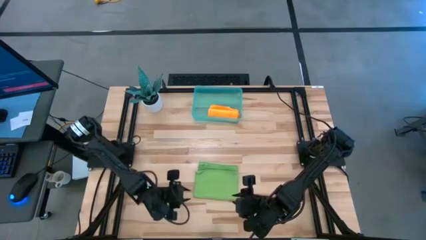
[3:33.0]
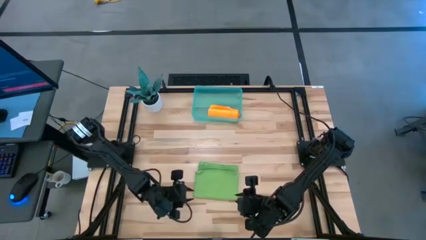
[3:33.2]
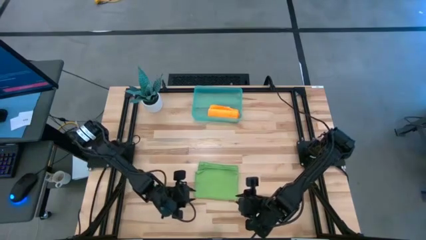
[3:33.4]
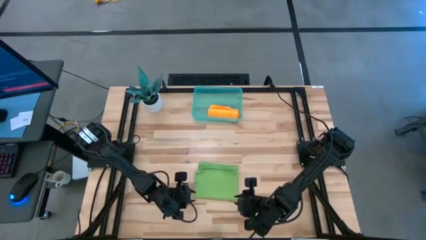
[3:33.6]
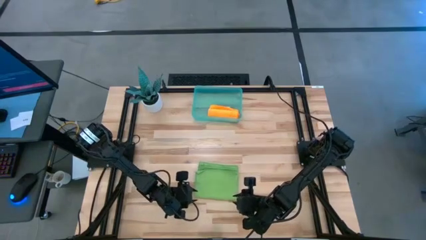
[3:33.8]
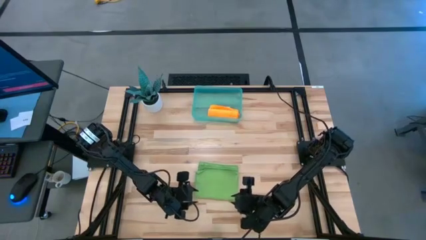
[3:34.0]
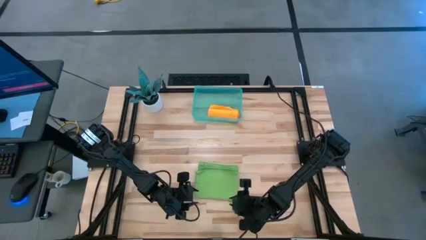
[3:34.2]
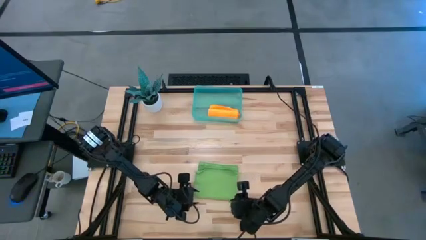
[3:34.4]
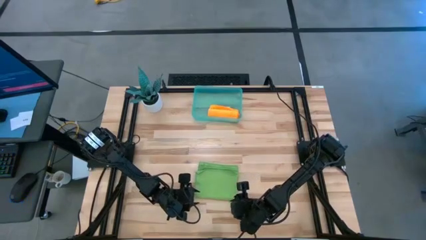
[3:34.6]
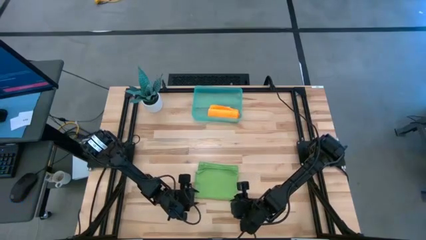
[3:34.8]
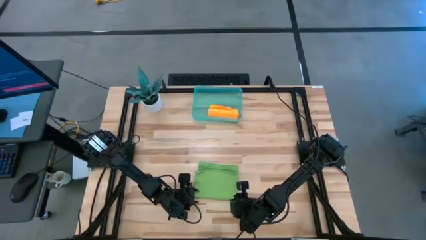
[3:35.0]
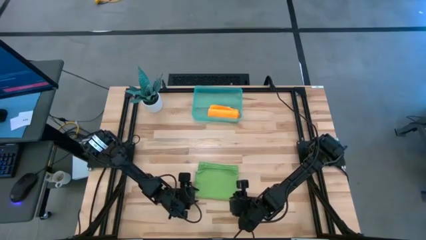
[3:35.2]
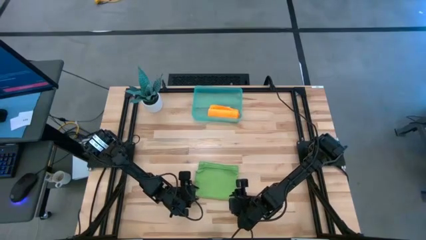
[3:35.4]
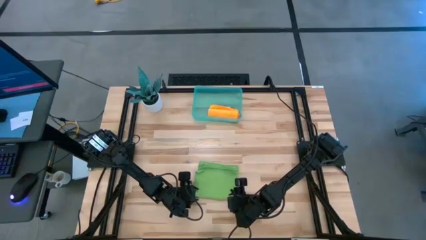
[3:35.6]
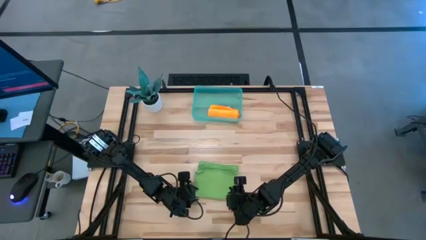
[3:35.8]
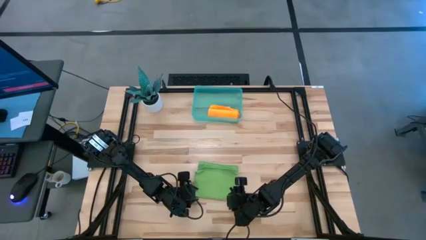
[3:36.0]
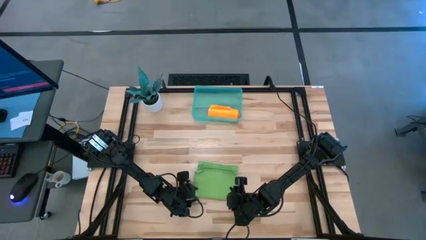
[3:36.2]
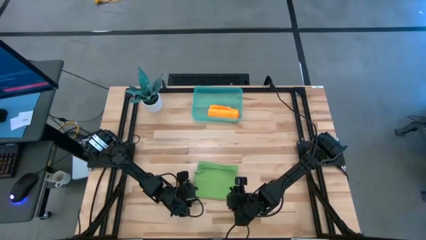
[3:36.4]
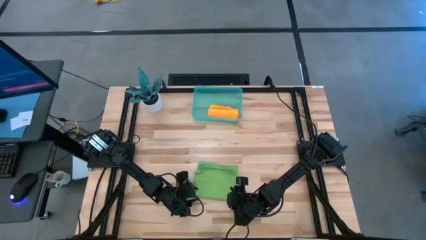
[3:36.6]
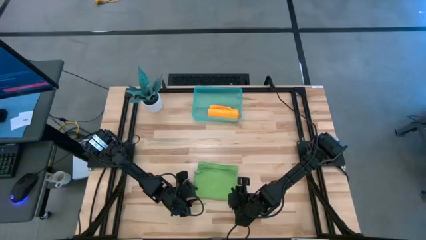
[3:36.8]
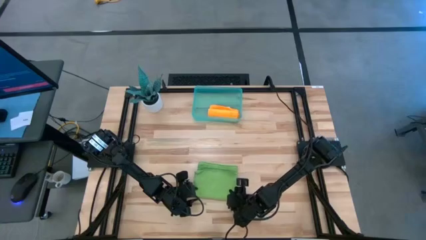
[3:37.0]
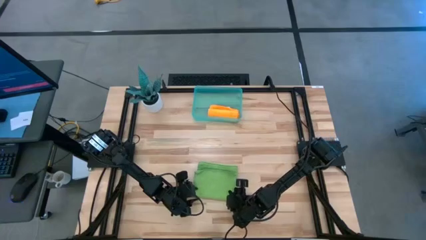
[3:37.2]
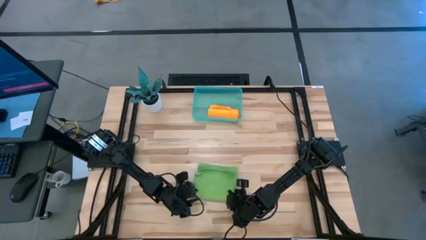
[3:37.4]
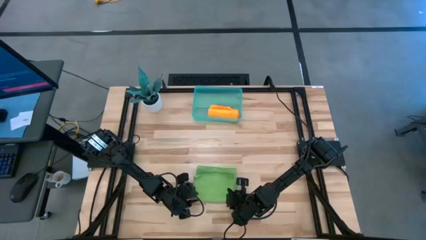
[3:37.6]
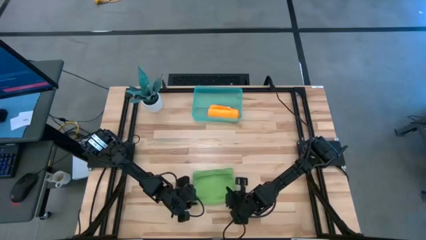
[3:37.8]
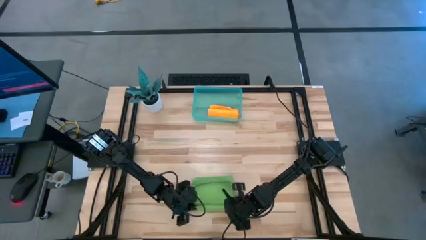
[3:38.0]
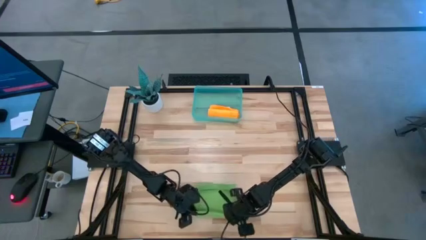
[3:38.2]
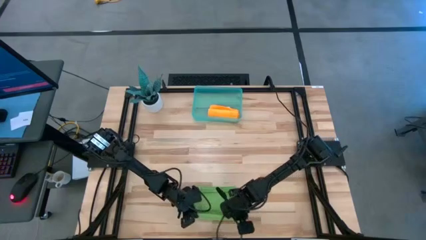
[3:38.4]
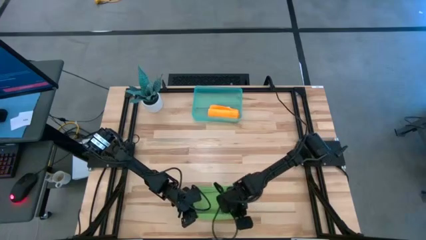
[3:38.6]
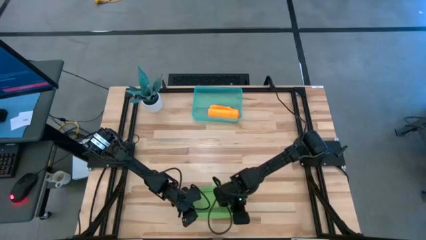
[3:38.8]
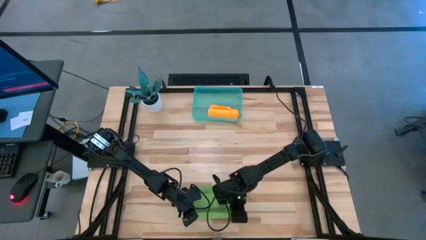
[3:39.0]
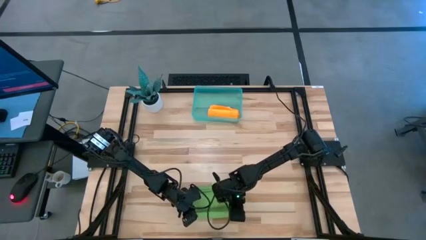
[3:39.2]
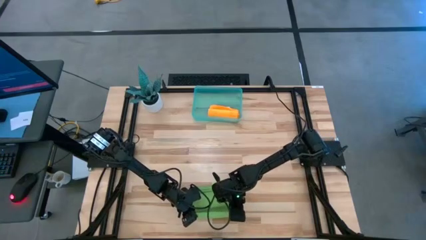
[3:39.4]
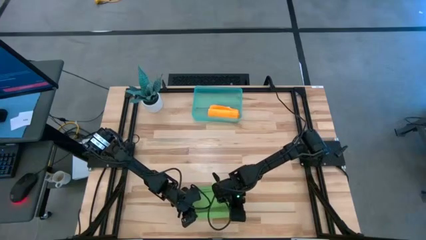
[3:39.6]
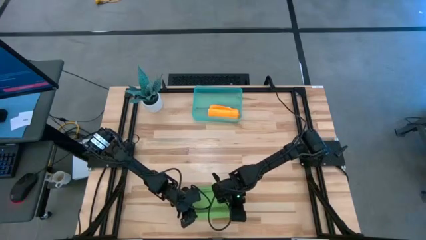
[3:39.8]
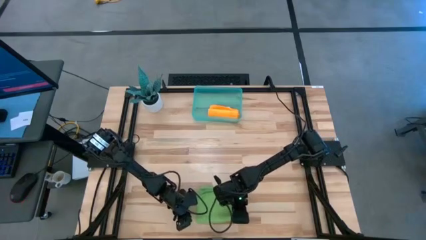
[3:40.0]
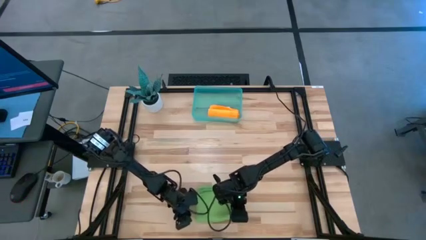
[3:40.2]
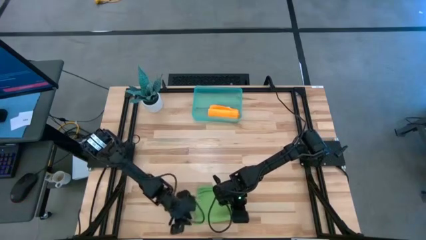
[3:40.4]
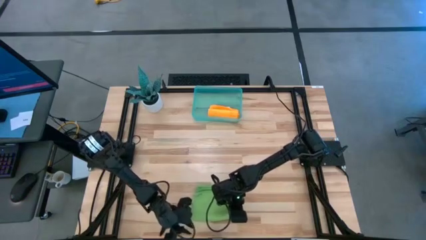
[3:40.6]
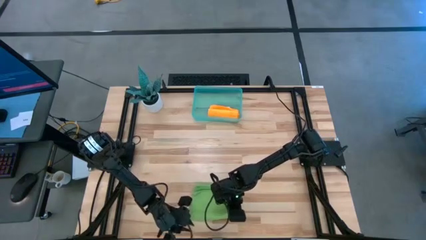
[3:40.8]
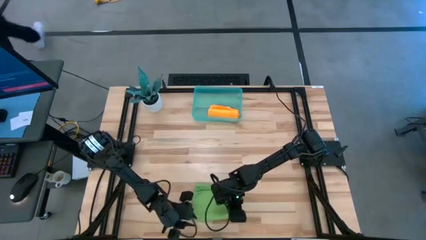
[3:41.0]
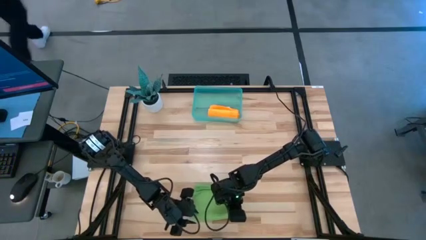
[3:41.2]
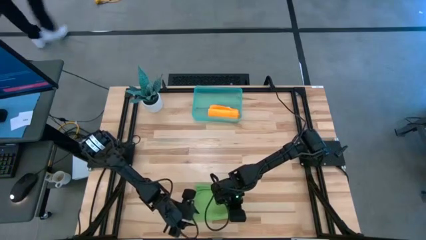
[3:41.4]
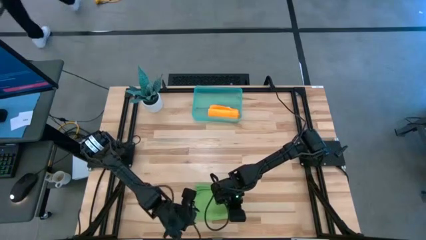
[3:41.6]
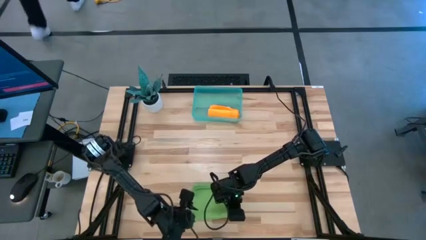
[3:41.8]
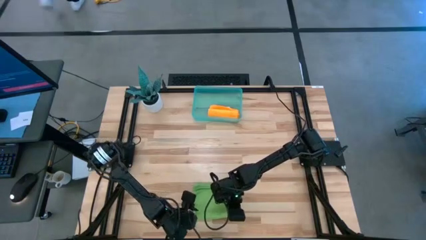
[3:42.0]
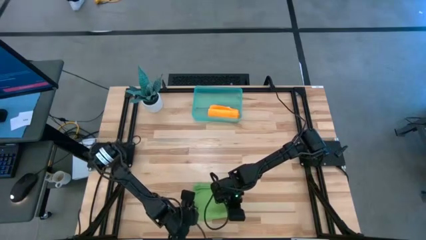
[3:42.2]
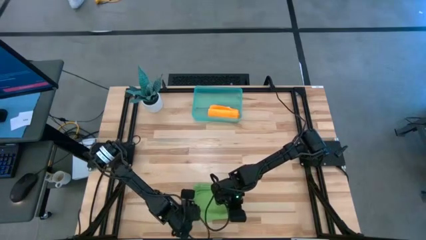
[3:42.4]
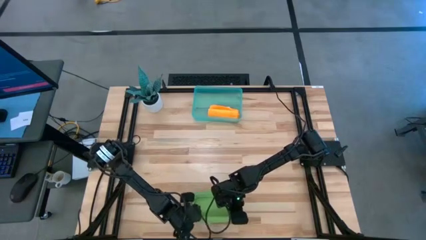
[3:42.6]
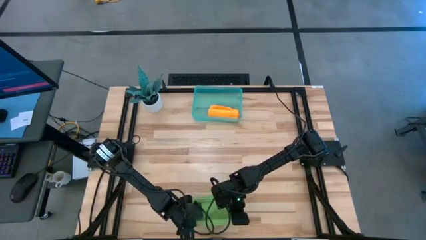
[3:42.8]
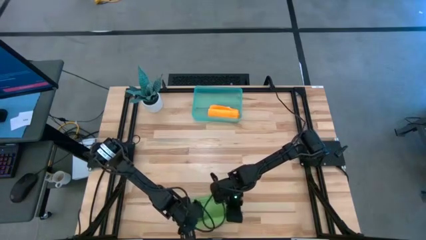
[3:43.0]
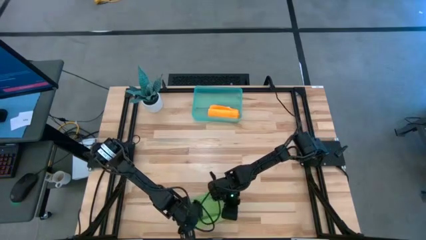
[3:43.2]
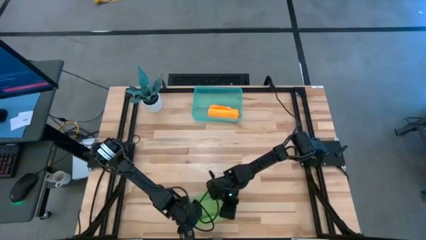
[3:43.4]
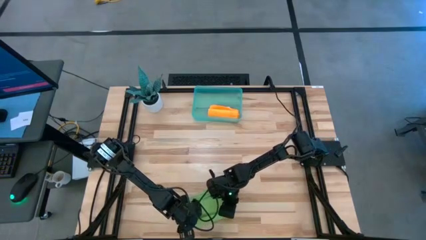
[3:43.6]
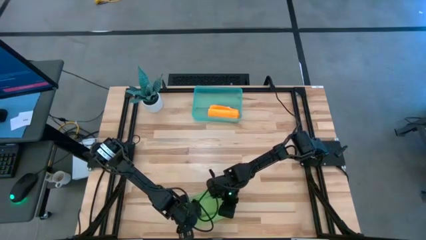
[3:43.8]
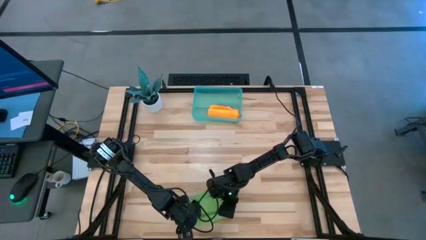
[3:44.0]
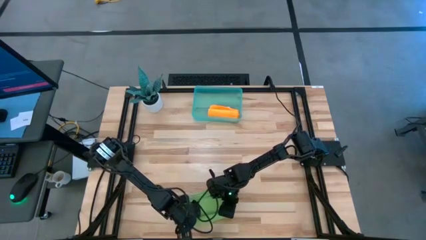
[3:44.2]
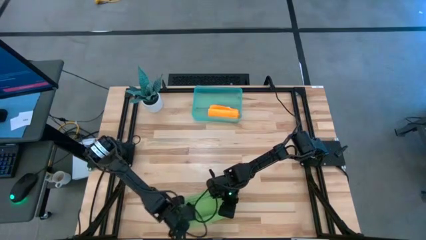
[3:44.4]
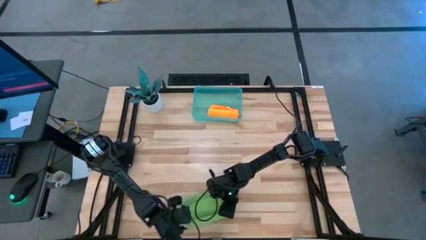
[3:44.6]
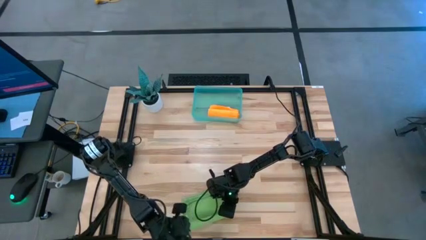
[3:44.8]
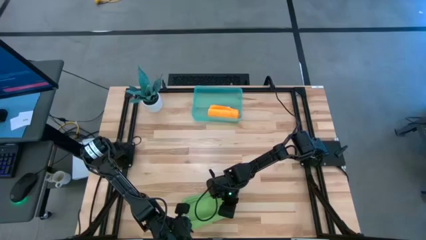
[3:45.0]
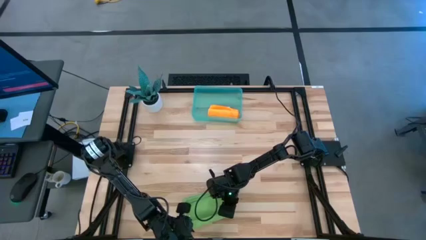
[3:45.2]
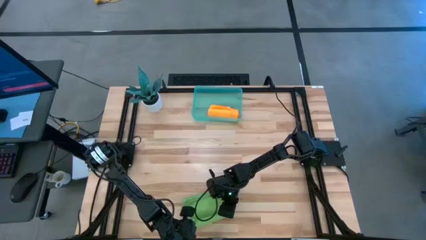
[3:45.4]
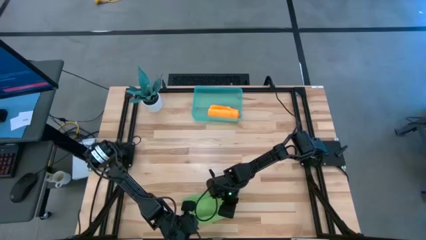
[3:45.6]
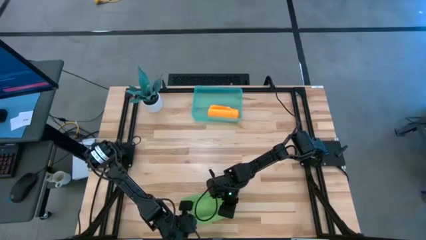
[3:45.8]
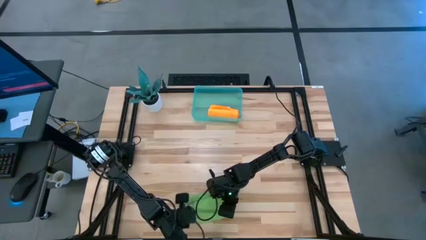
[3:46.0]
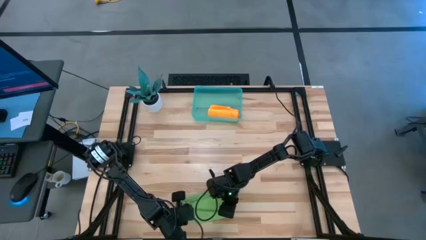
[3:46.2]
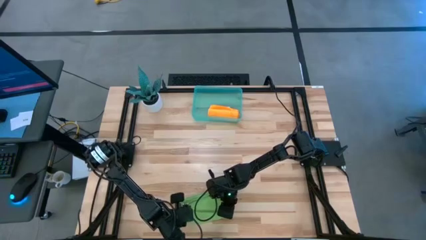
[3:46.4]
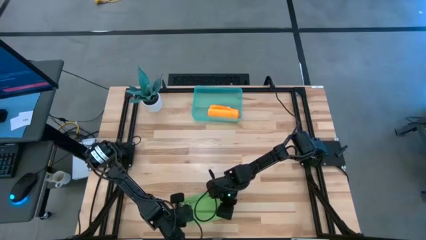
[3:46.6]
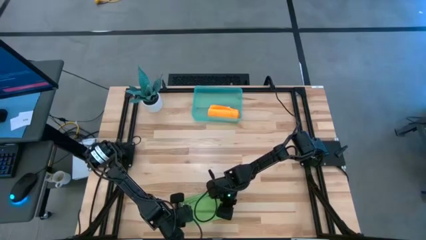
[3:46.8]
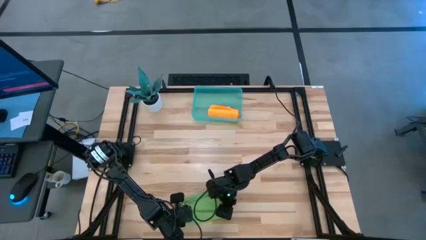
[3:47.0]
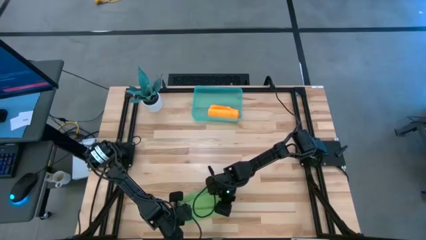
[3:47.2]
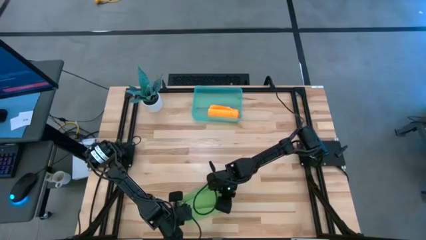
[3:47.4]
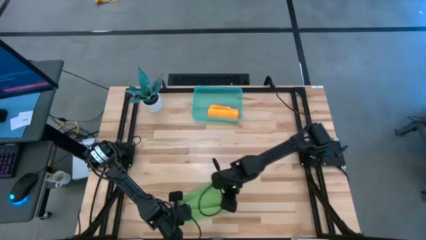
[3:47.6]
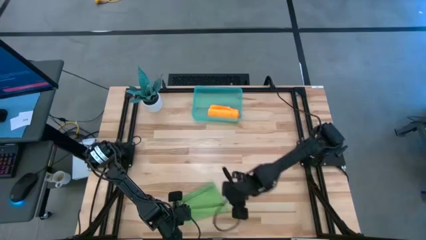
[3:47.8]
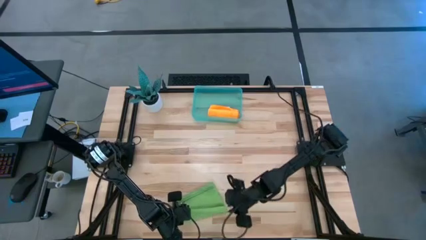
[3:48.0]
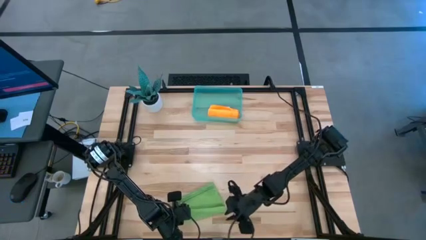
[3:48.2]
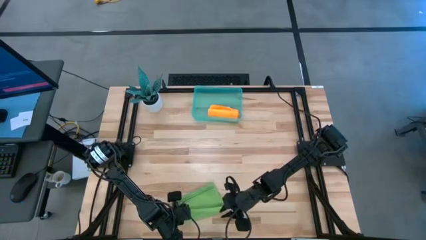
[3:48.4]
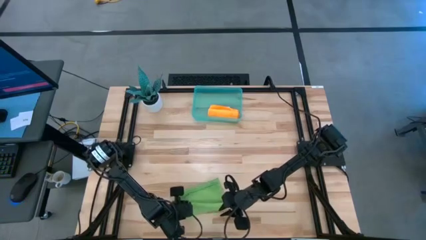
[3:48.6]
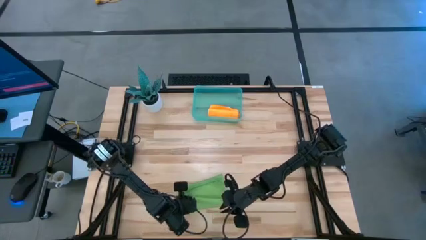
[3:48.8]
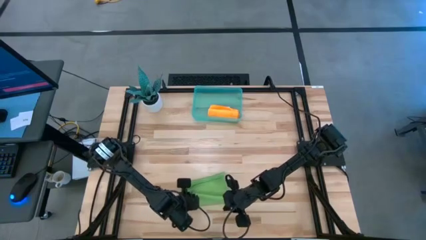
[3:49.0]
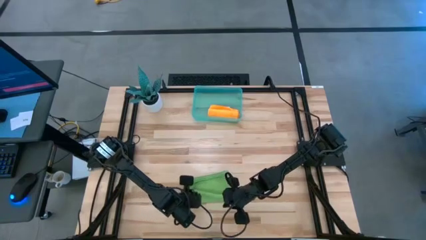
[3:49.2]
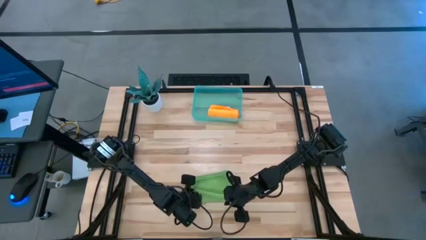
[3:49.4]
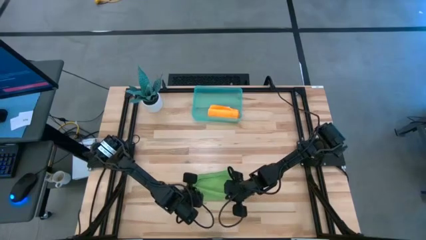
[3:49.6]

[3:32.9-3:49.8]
Task: Roll microfiber towels into tight, uniform cylinder then place into a basket
Roll the green microfiber cloth
